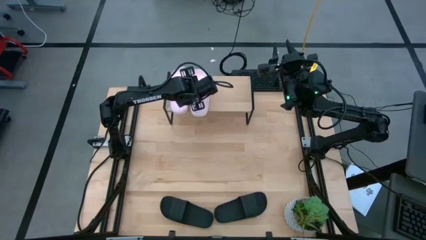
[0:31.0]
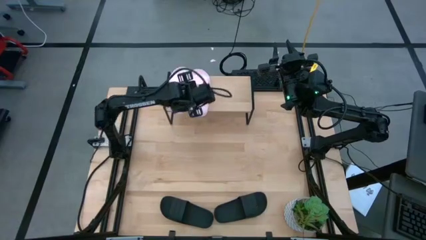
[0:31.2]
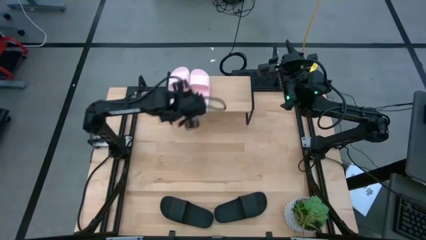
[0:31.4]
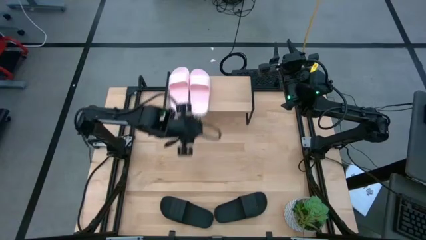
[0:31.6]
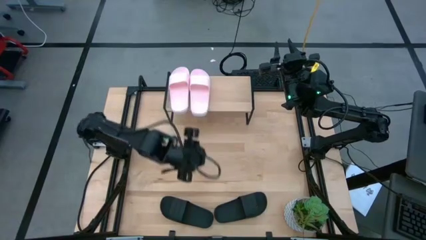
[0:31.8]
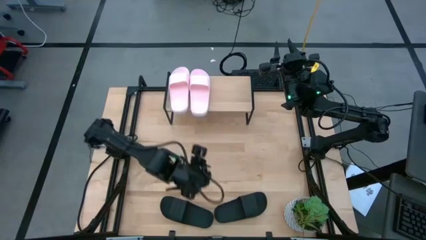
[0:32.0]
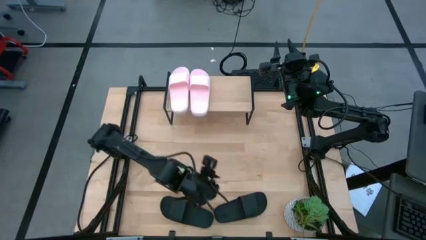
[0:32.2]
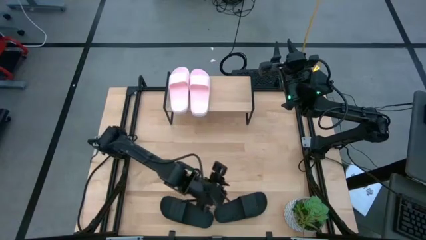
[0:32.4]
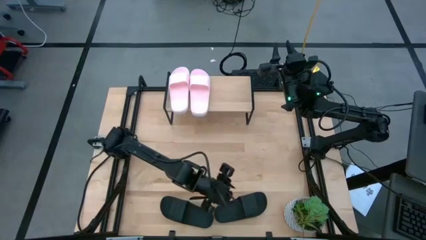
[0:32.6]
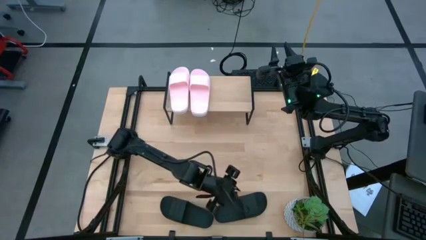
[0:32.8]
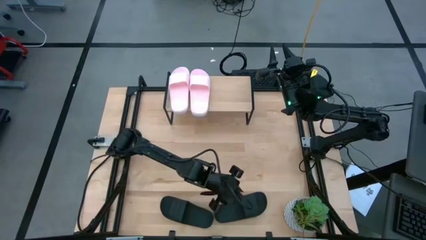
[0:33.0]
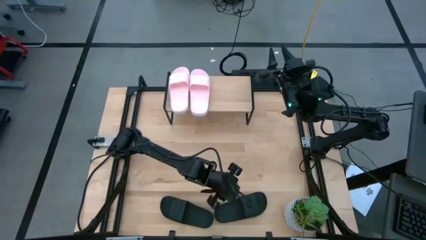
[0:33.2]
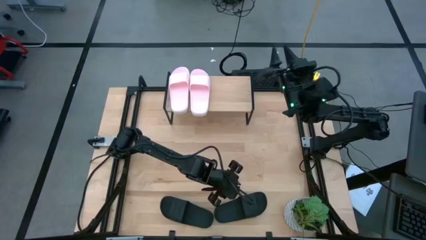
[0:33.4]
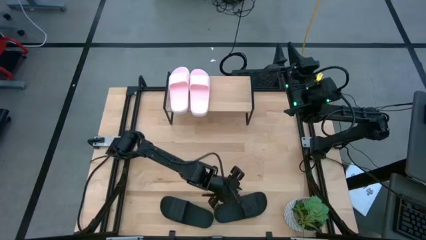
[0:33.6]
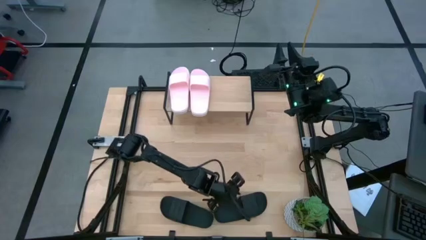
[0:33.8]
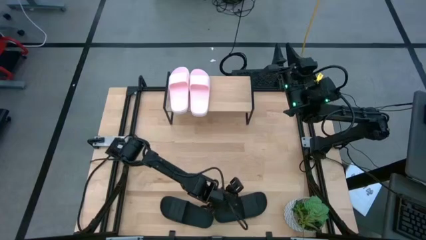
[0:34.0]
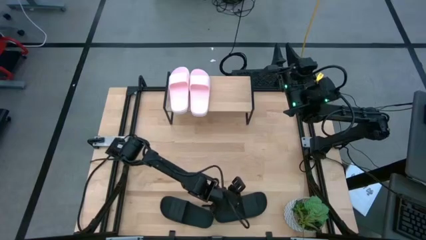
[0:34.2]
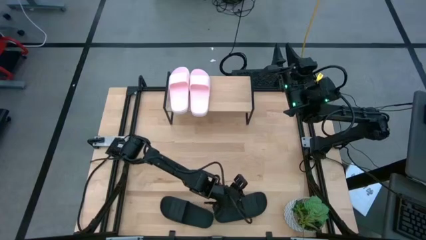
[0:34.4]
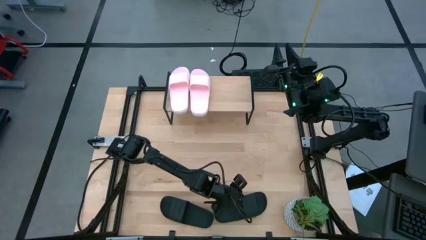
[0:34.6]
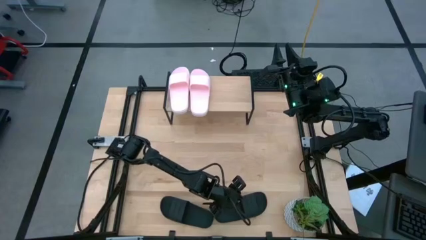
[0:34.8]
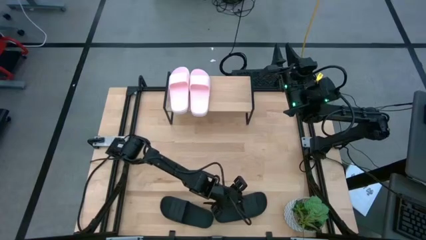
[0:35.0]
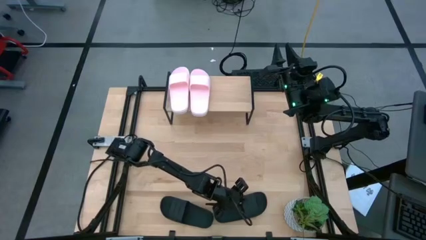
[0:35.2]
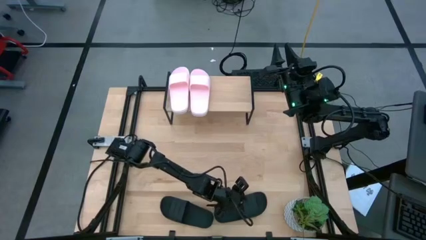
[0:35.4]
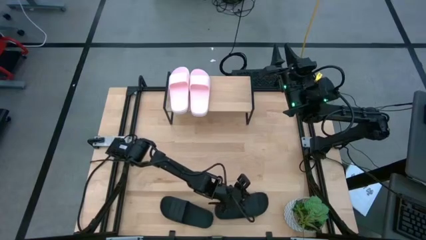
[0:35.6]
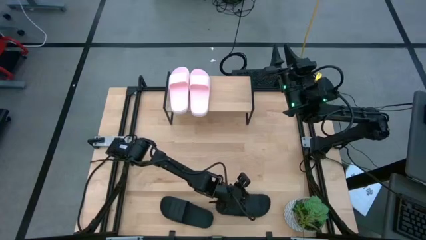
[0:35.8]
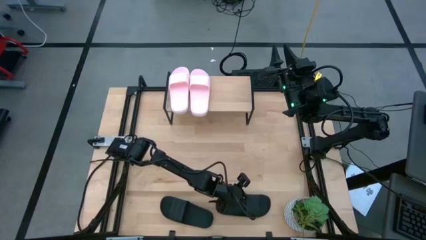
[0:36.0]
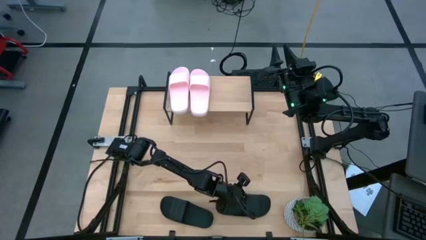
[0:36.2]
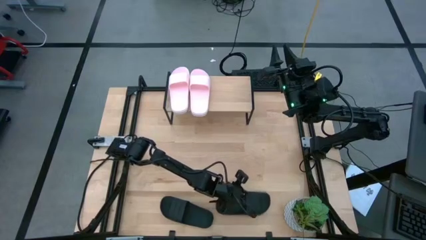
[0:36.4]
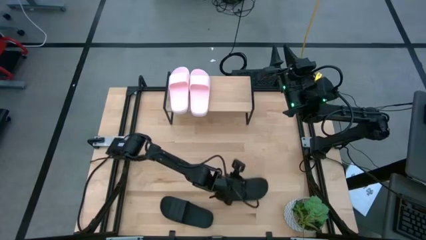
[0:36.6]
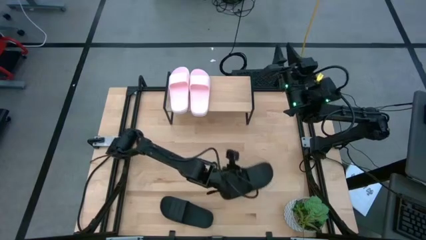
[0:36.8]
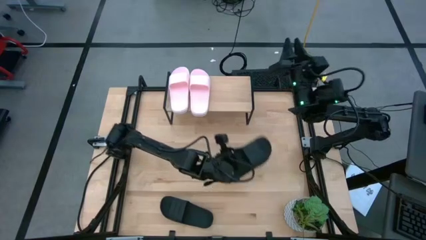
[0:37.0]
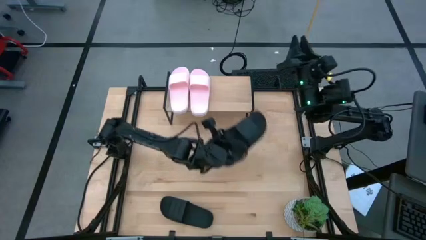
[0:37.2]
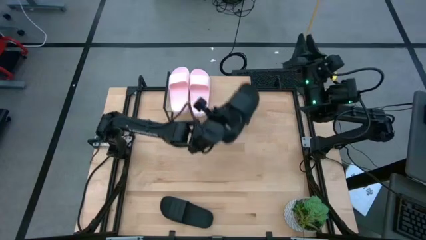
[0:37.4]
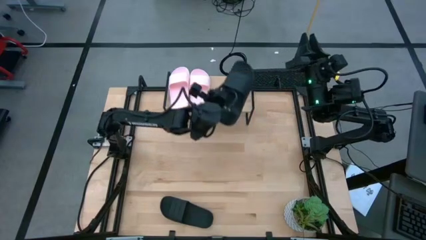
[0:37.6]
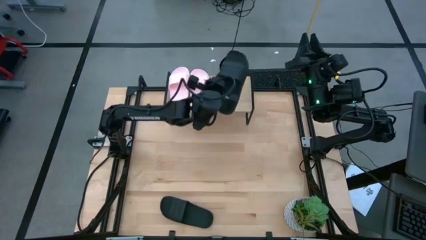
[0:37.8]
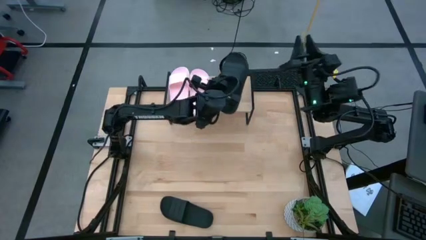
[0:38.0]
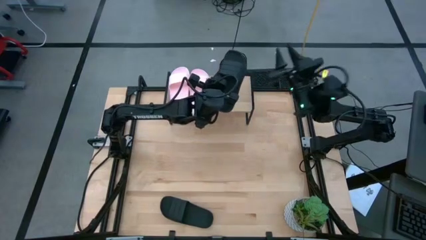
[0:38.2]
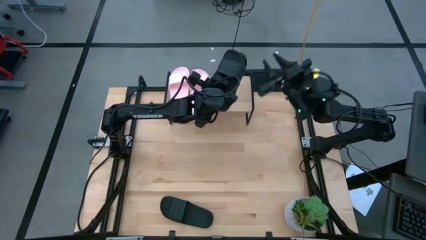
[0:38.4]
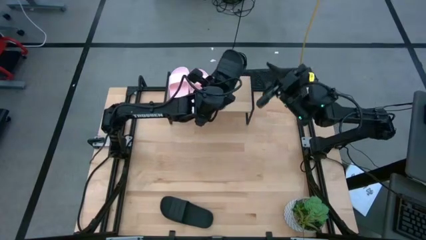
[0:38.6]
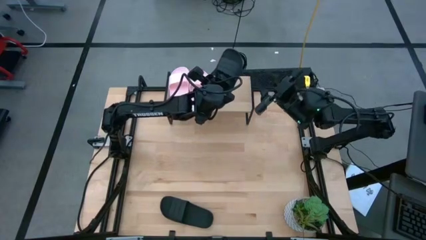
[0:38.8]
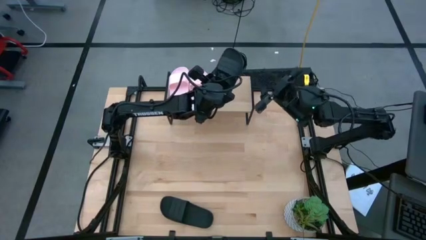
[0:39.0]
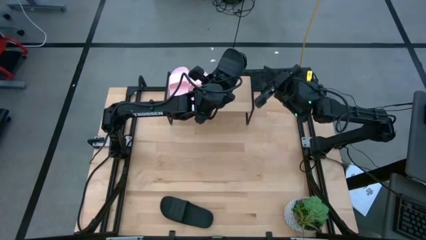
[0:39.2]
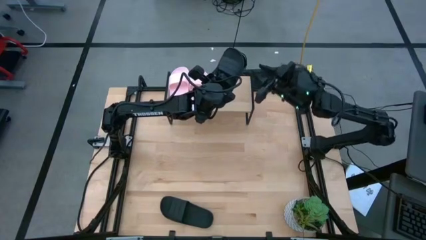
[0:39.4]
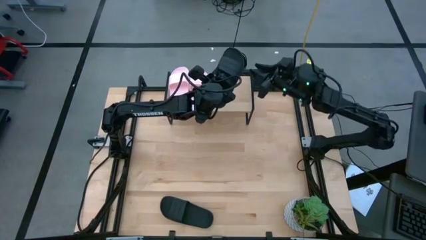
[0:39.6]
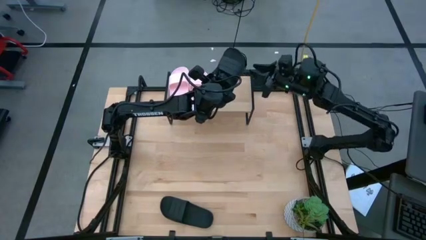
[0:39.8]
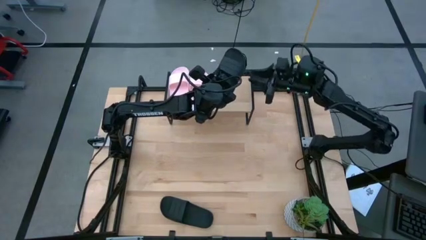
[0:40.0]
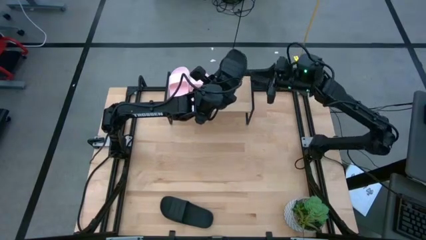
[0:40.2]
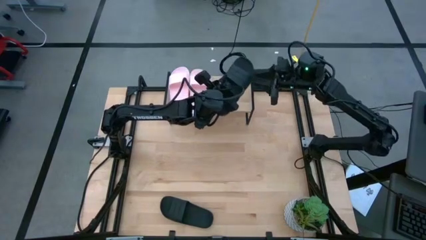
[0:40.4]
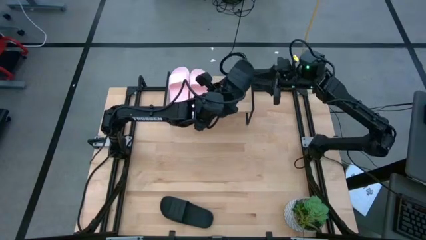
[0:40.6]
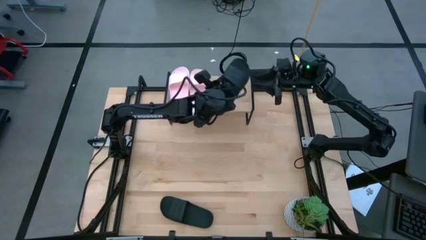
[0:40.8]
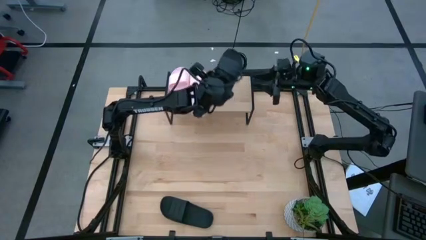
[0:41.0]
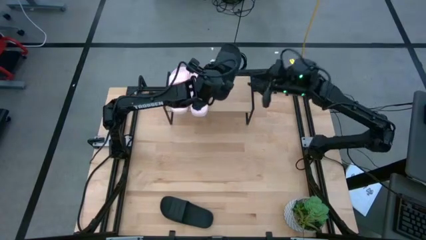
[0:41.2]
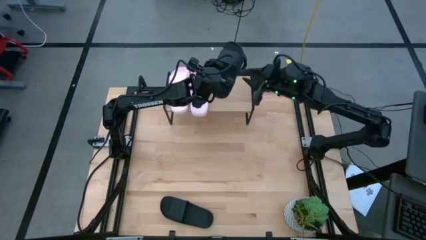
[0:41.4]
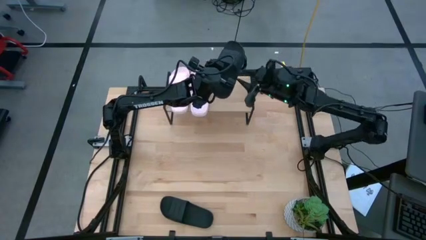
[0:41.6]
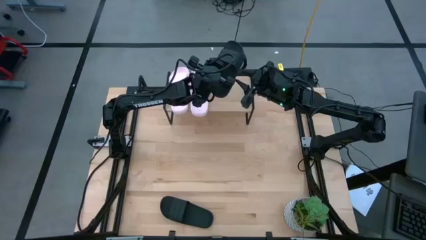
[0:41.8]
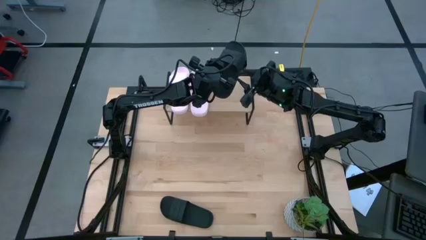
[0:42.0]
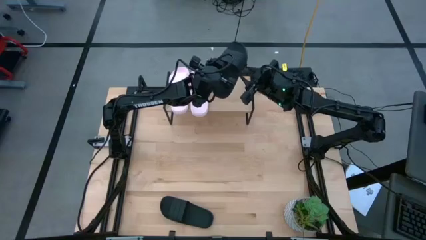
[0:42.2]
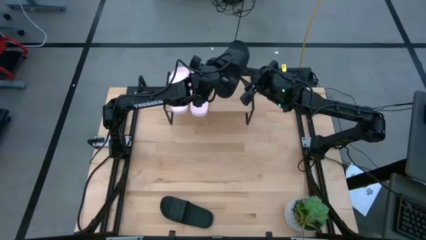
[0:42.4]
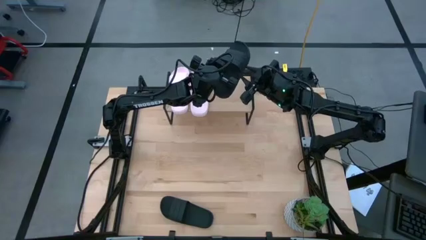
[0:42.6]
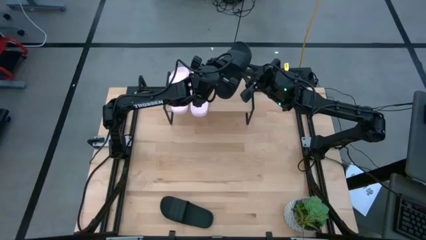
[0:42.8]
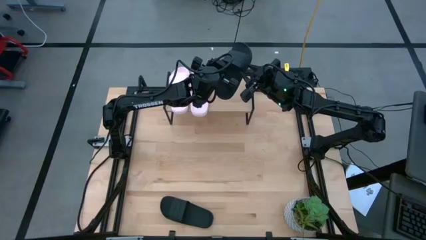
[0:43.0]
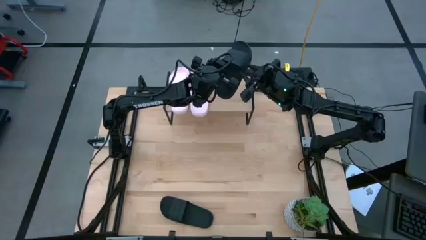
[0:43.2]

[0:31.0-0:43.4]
Task: Pick and place slides into the shelf
Put the right black slide on the shelf
